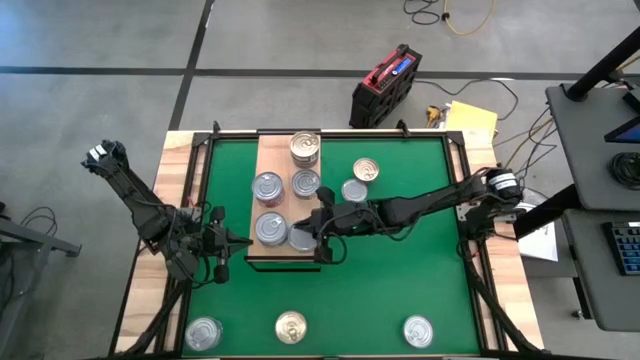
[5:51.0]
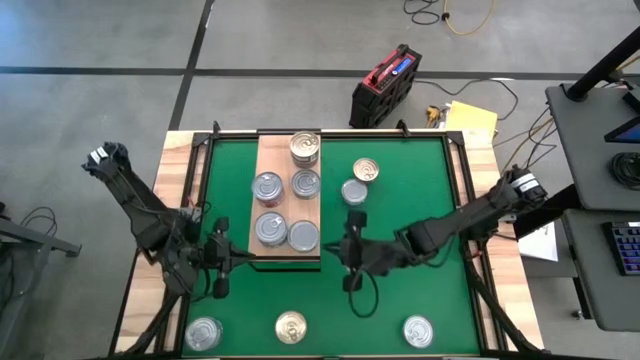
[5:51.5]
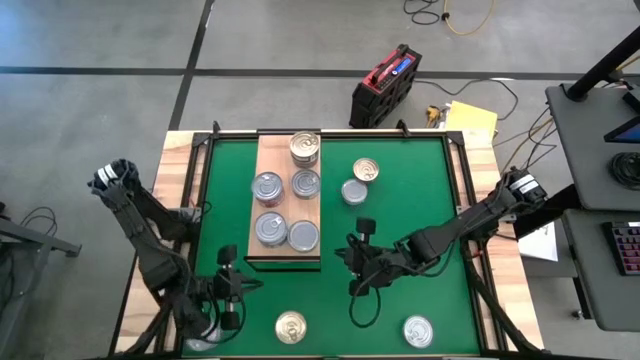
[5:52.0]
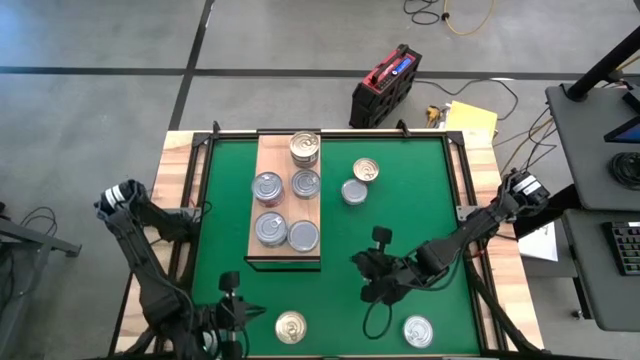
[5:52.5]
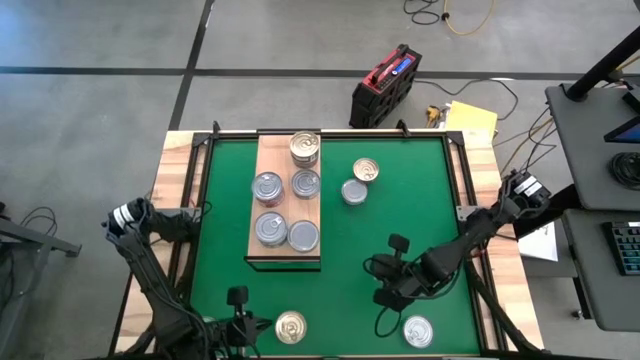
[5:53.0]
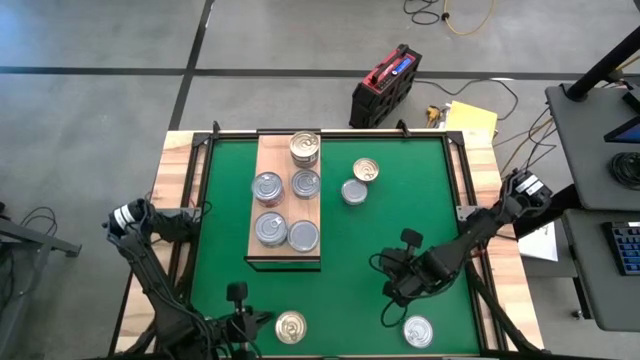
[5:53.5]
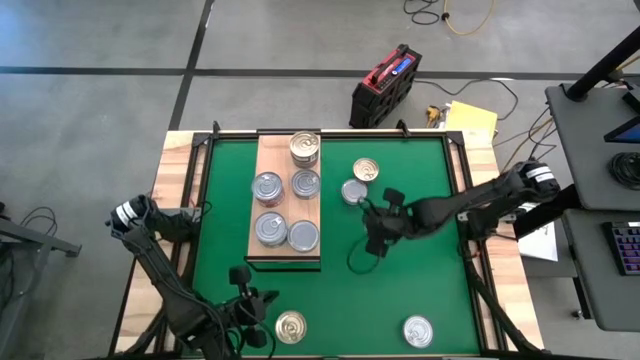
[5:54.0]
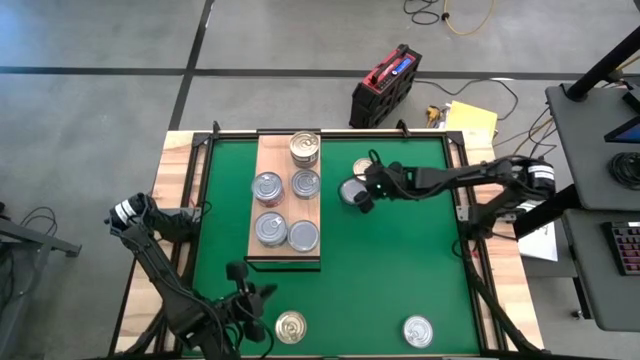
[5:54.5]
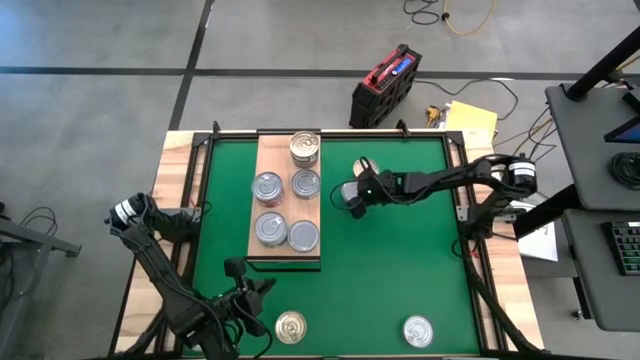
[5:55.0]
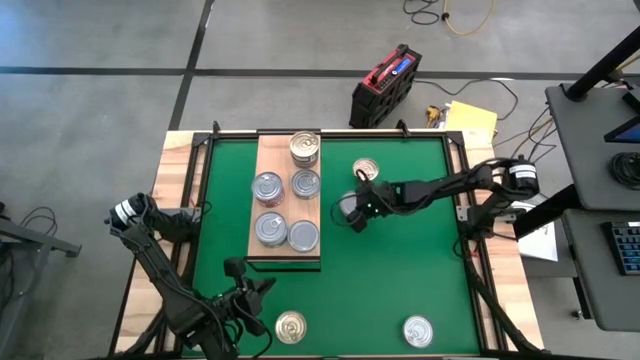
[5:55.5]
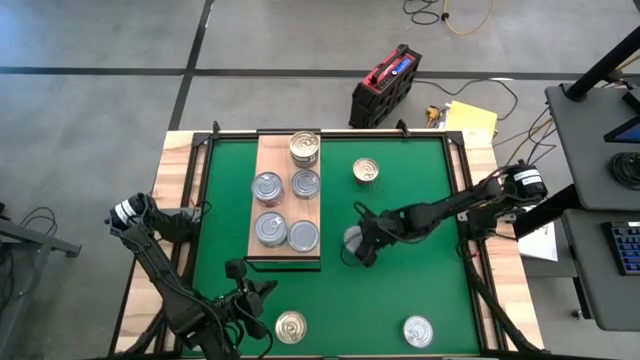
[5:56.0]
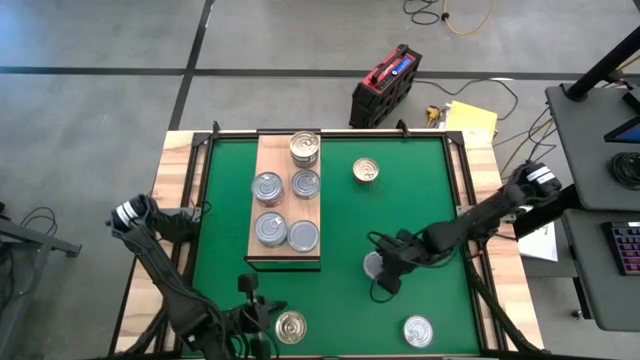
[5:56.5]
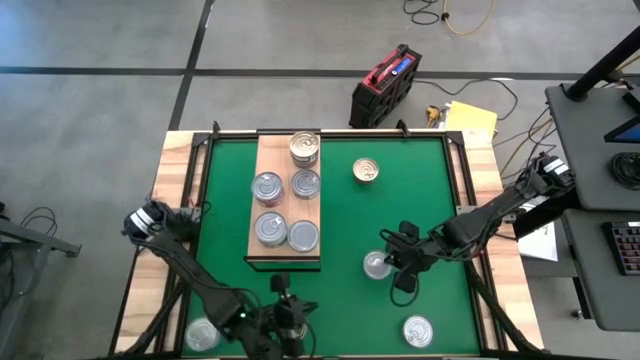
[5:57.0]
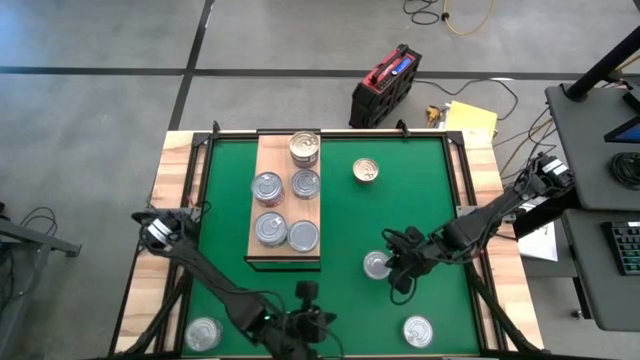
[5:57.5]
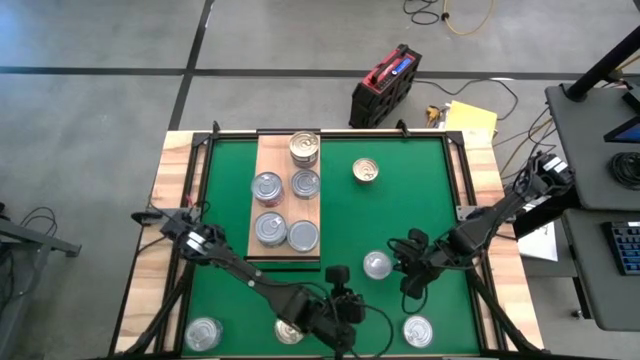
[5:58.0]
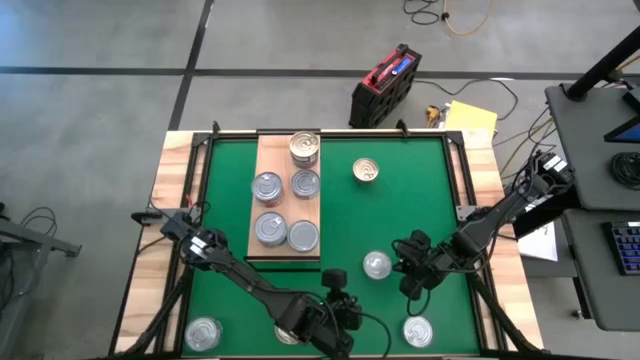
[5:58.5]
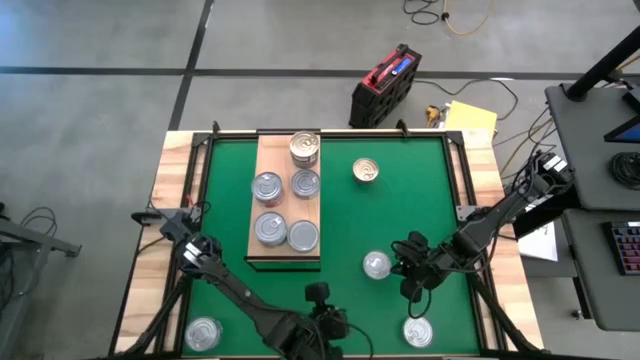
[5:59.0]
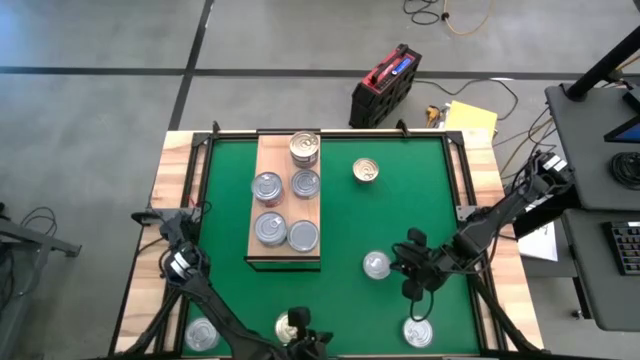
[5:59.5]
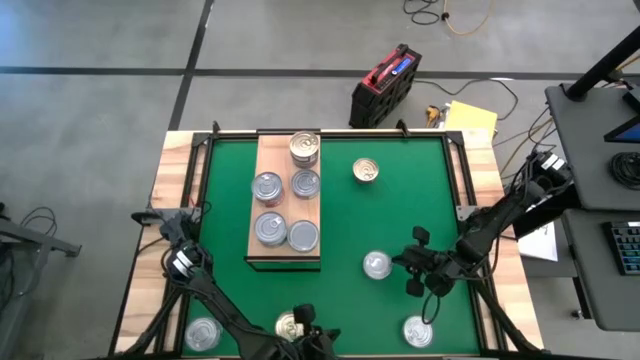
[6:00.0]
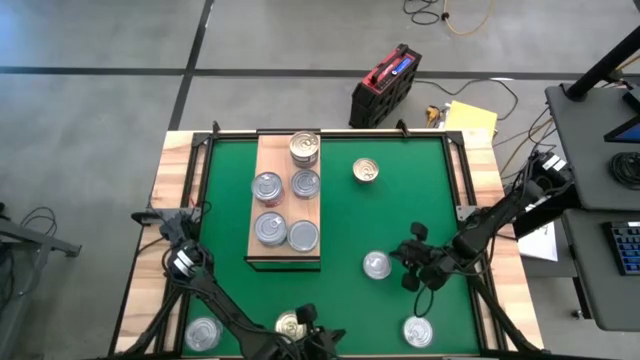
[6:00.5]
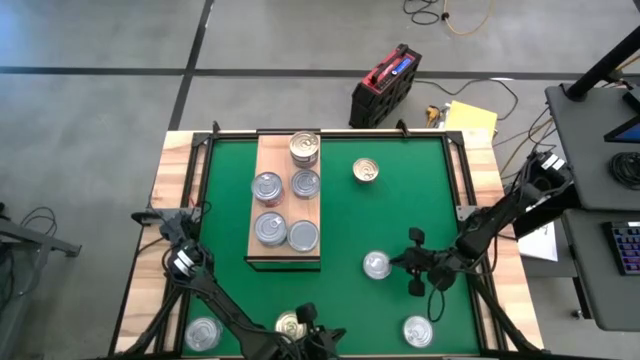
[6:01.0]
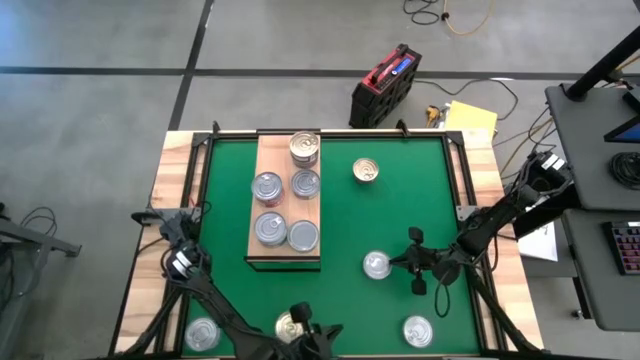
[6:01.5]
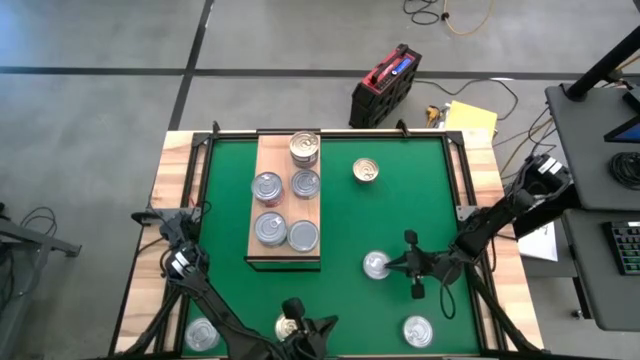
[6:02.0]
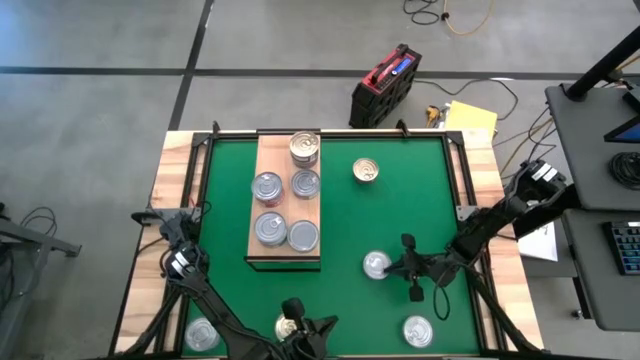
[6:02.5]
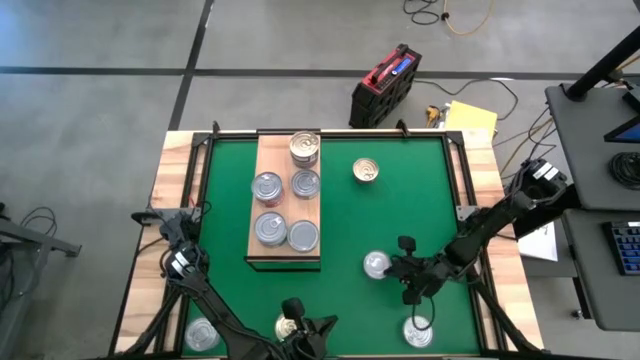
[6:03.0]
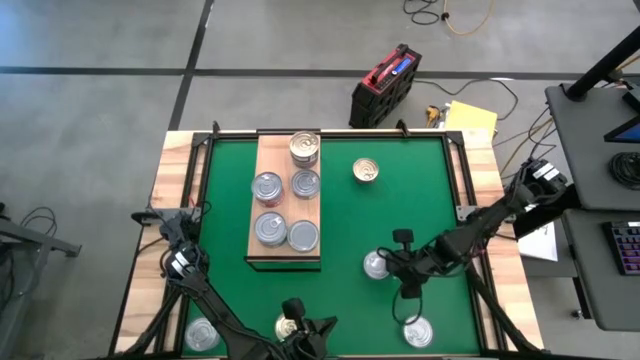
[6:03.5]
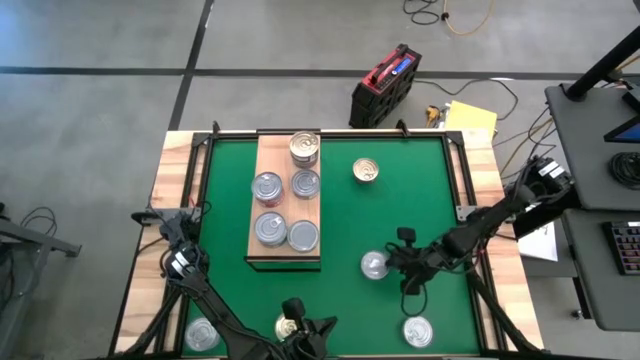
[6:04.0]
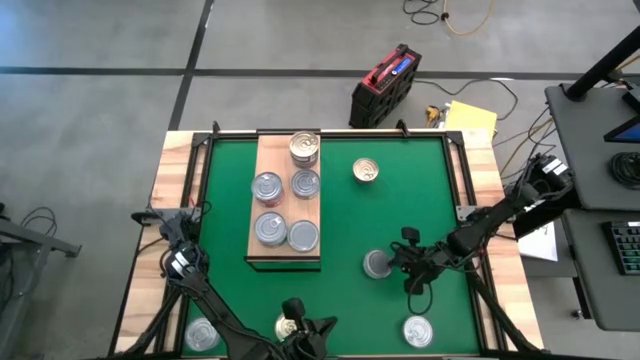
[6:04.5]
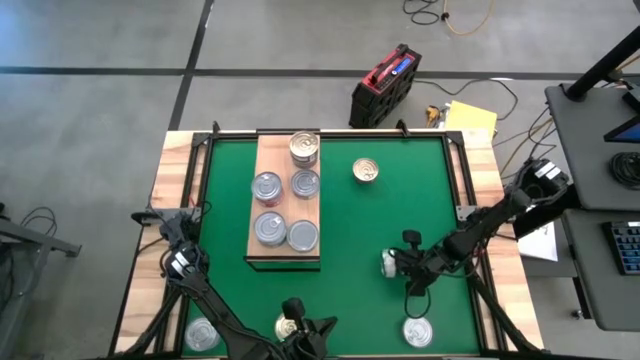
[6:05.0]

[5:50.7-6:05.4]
Task: Stack canned seafood by type on shelf
Stack the green and white tuna can on top of the green and white tuna can on the shelf

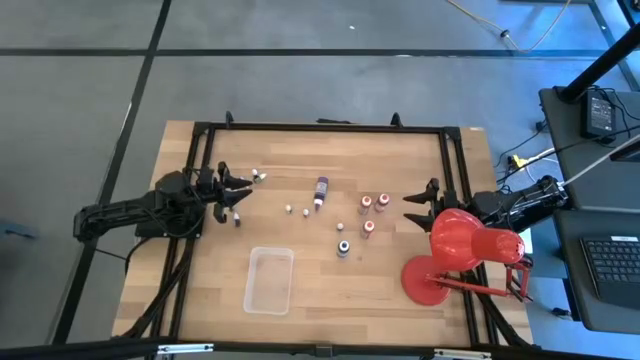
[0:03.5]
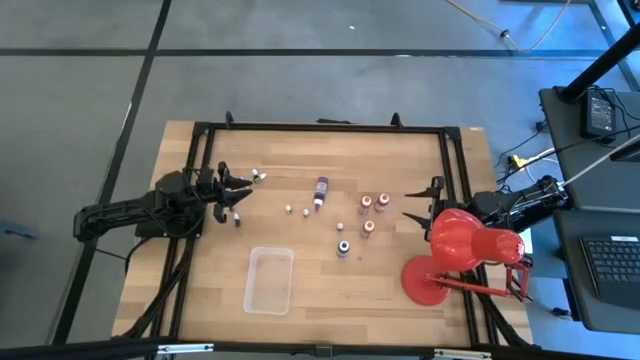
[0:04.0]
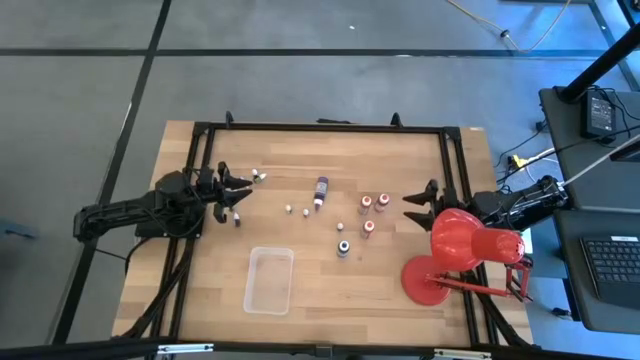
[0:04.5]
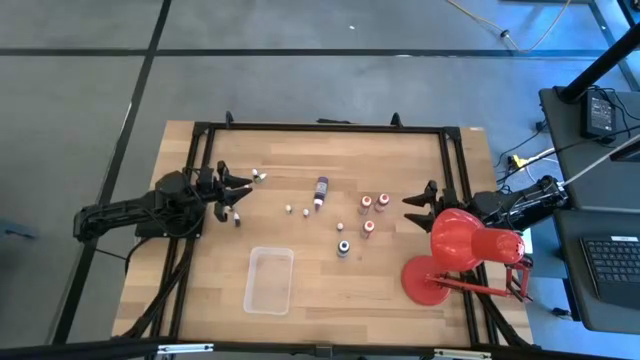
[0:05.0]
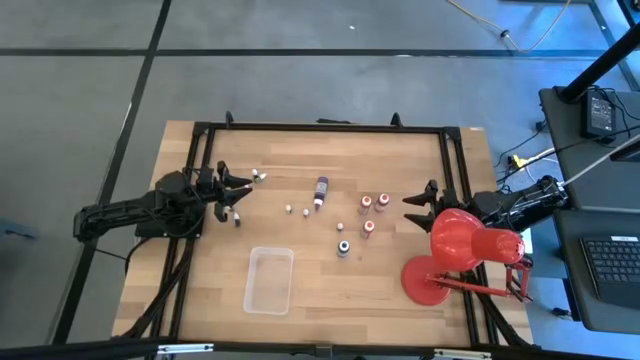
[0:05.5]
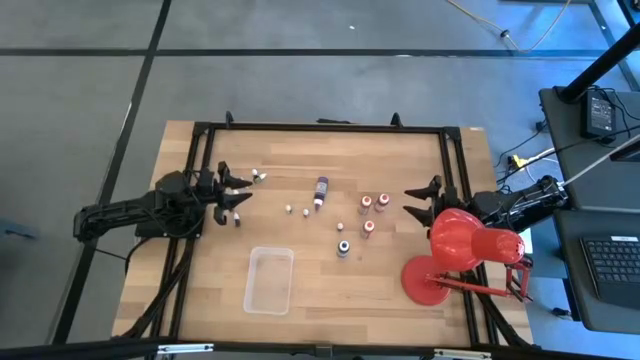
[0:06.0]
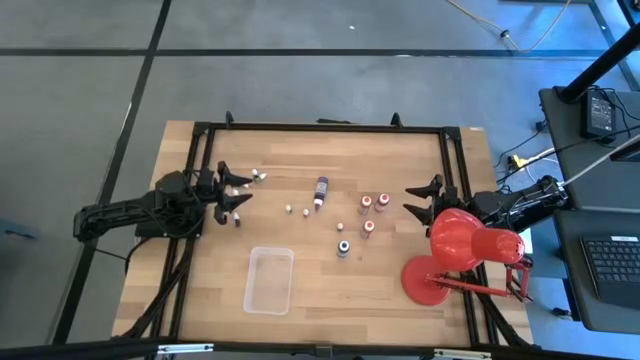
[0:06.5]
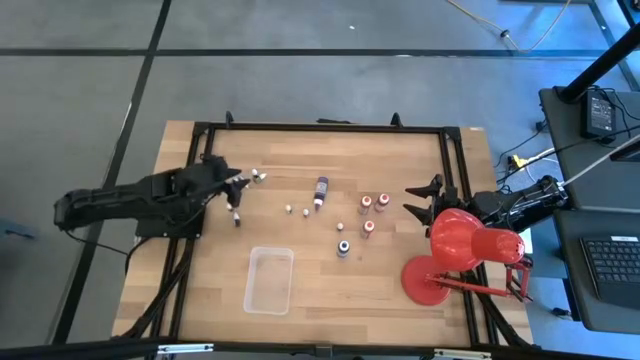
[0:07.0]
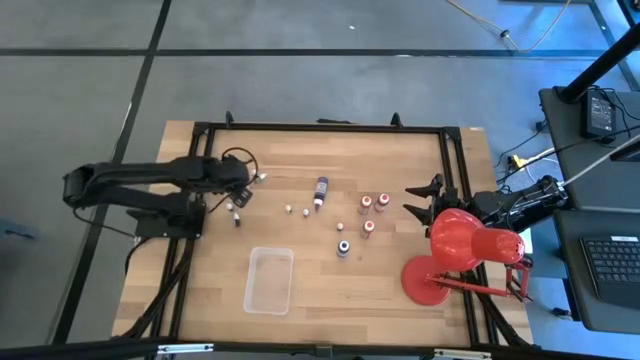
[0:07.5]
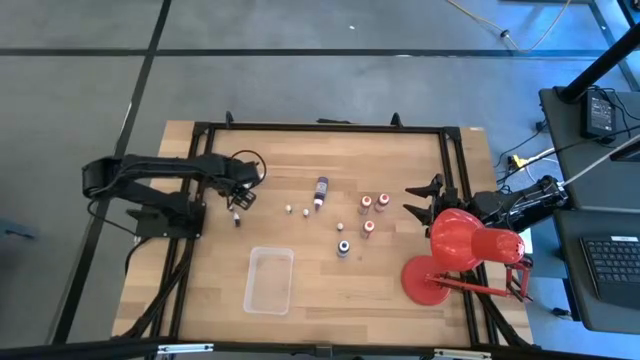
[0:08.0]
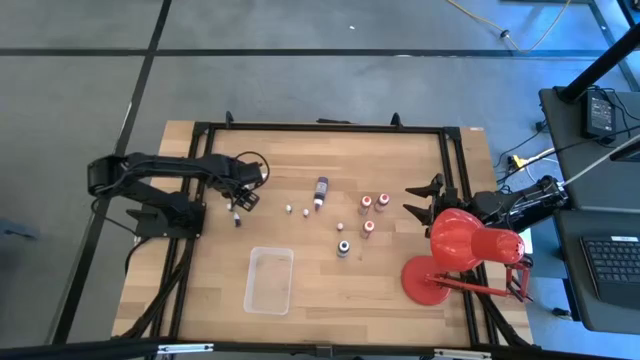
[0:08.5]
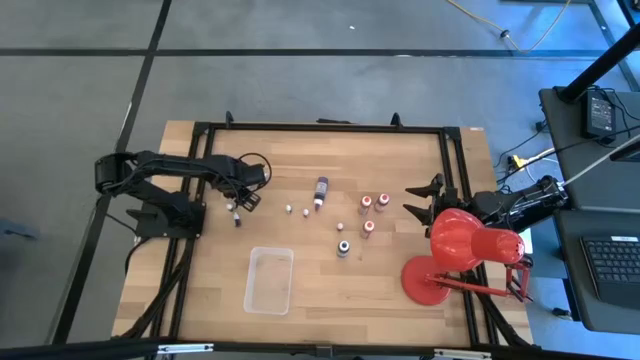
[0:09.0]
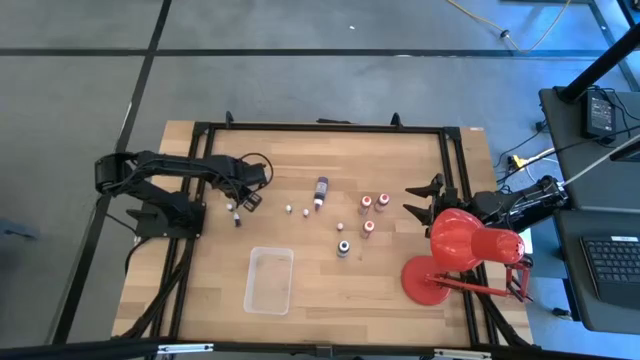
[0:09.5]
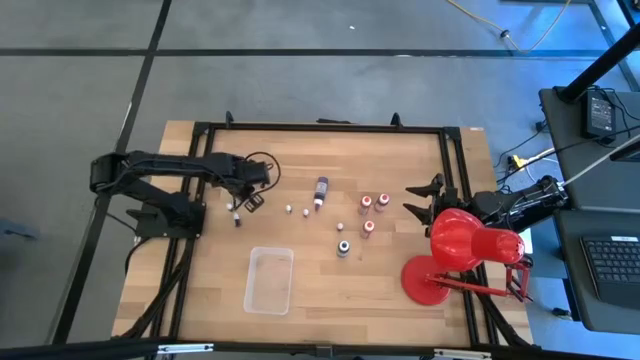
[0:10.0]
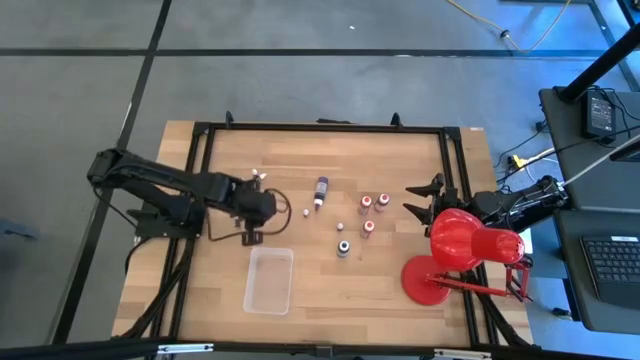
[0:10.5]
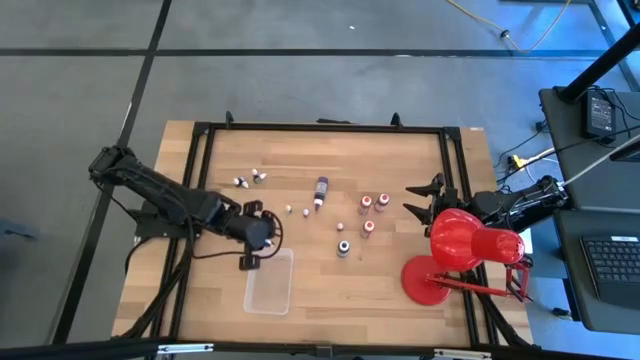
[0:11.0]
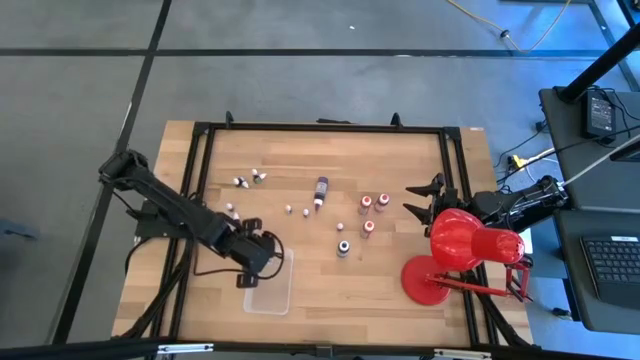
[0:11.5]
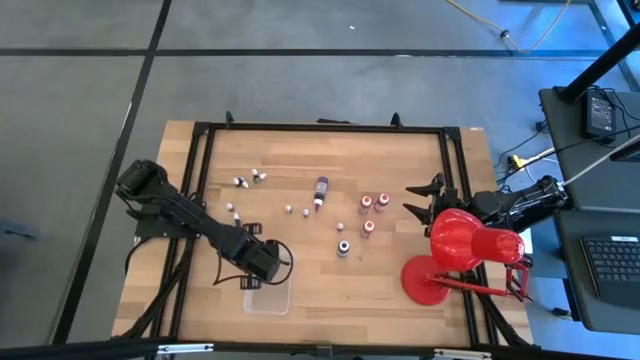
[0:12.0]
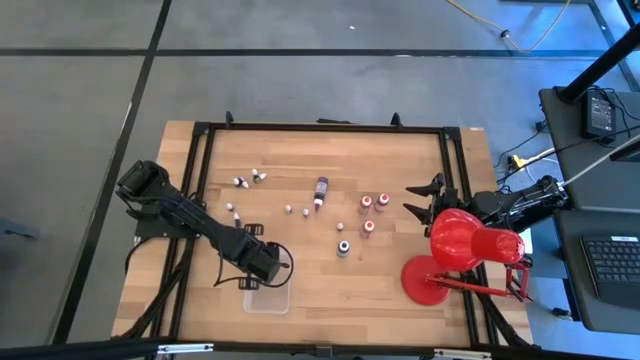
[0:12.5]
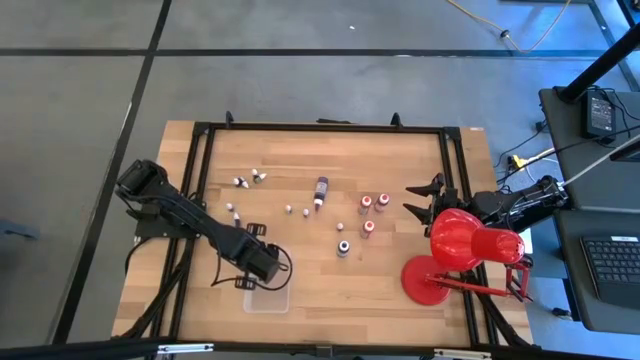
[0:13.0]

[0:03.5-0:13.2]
Task: Pick & Place food coloring
Put the small black food coloring bottle into the bin
